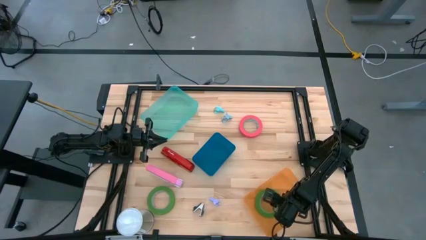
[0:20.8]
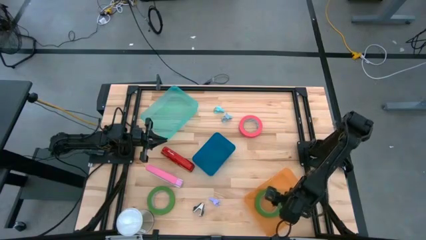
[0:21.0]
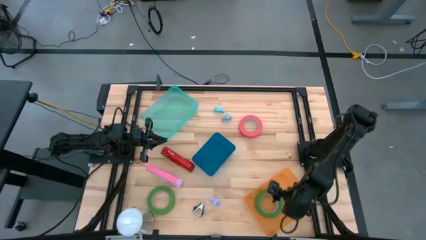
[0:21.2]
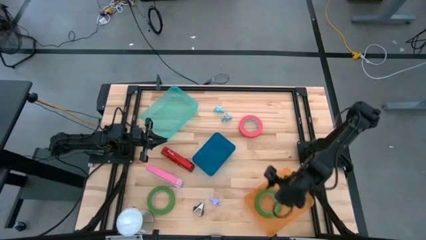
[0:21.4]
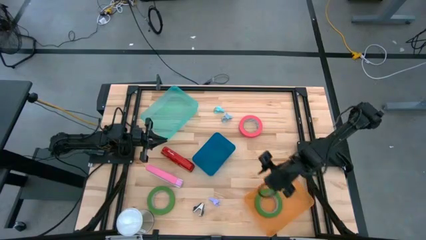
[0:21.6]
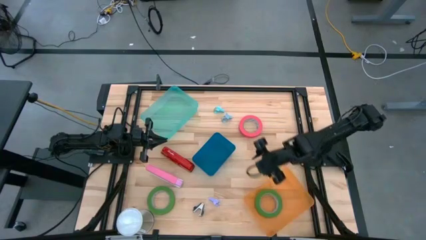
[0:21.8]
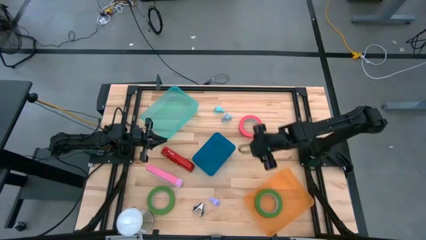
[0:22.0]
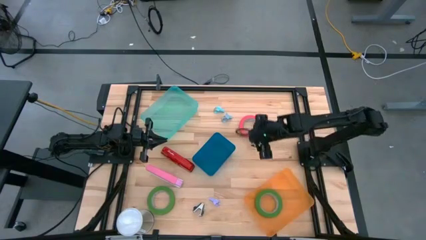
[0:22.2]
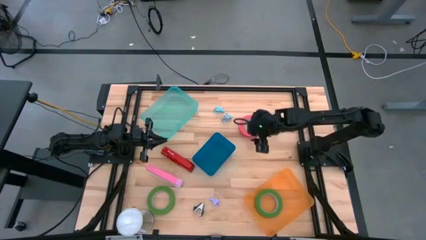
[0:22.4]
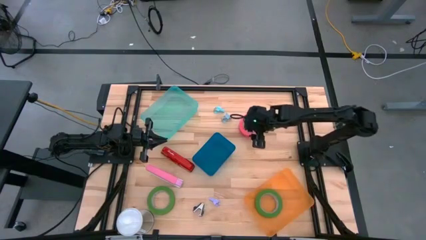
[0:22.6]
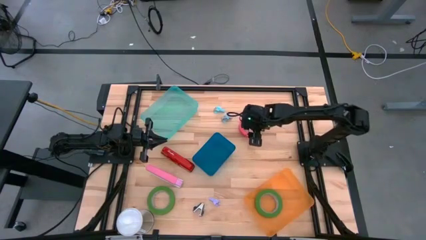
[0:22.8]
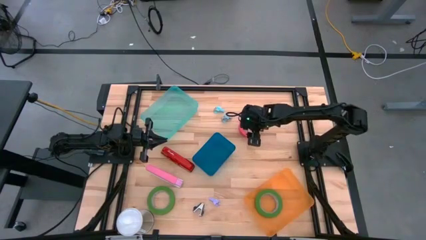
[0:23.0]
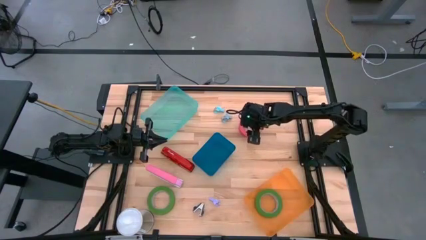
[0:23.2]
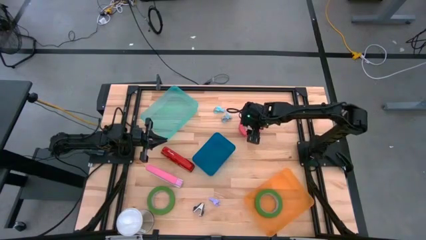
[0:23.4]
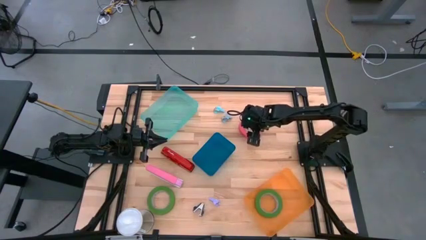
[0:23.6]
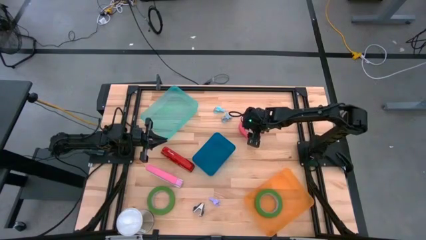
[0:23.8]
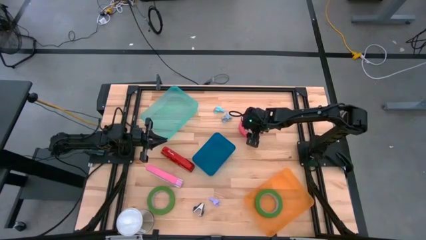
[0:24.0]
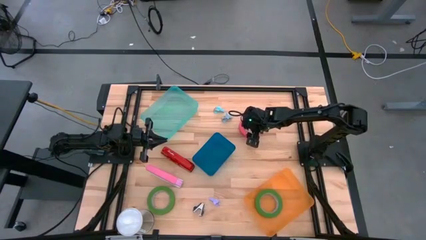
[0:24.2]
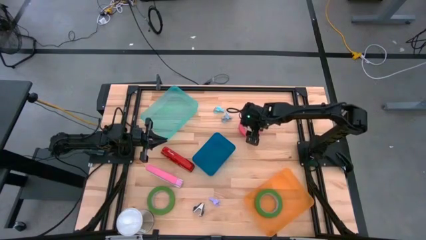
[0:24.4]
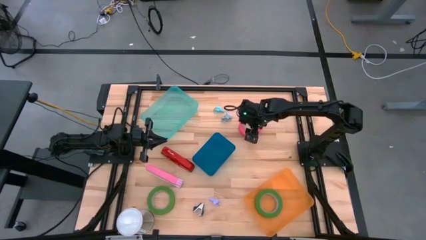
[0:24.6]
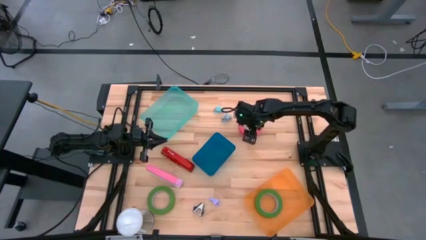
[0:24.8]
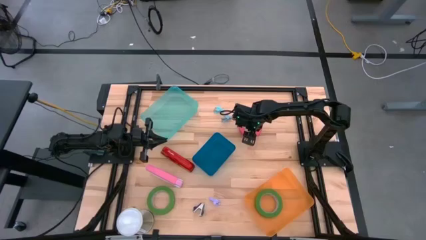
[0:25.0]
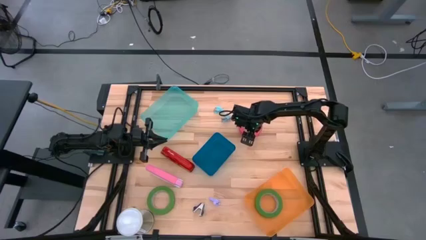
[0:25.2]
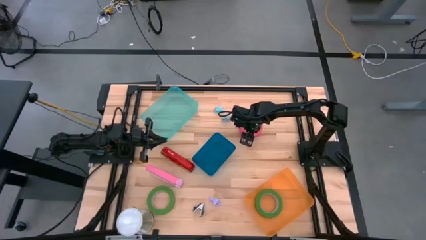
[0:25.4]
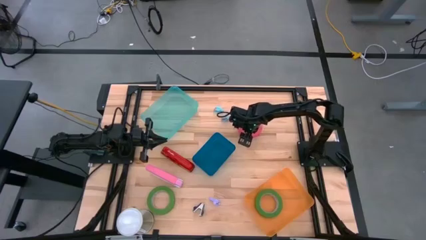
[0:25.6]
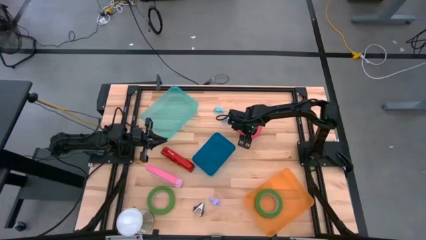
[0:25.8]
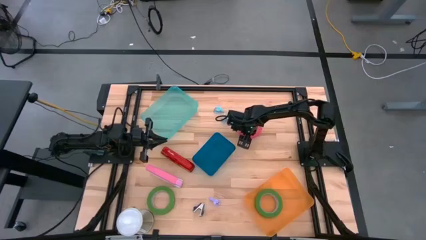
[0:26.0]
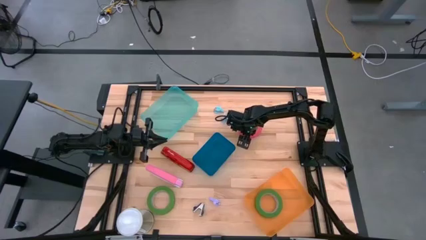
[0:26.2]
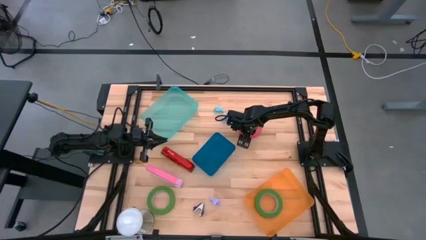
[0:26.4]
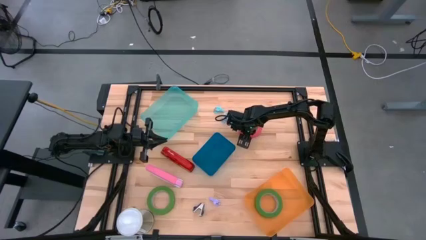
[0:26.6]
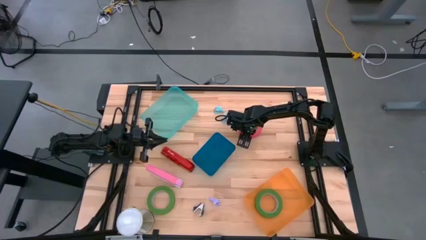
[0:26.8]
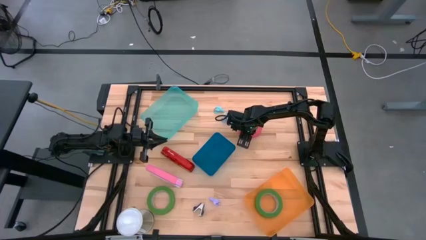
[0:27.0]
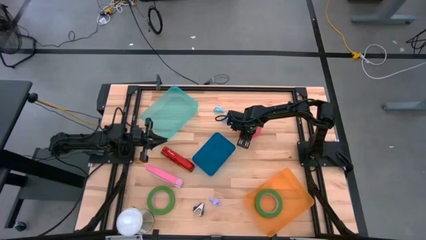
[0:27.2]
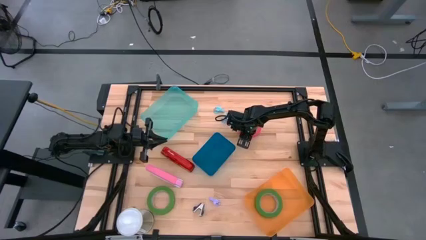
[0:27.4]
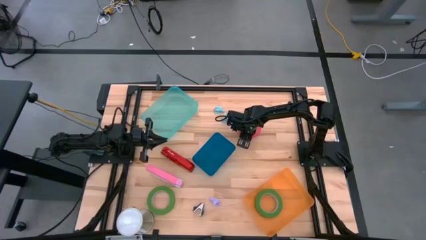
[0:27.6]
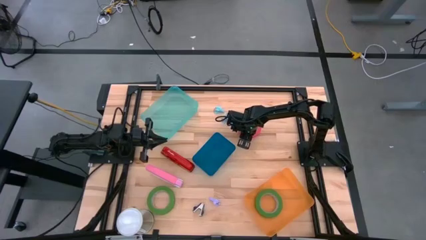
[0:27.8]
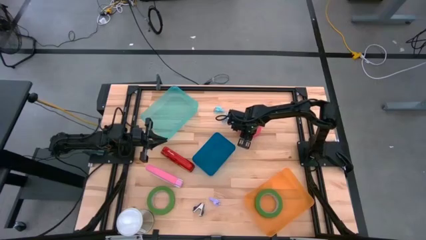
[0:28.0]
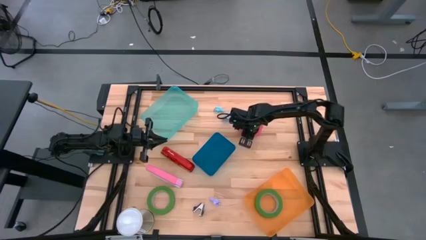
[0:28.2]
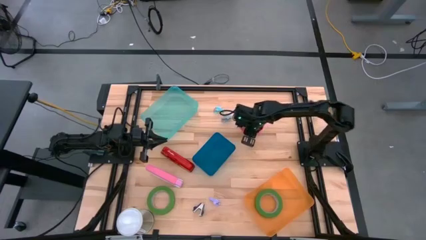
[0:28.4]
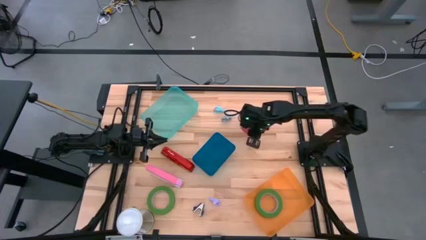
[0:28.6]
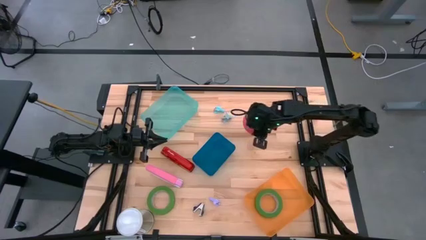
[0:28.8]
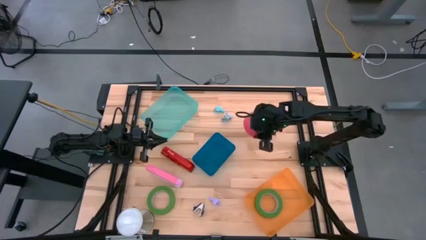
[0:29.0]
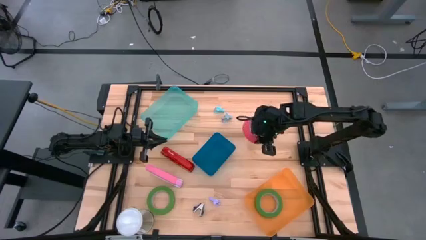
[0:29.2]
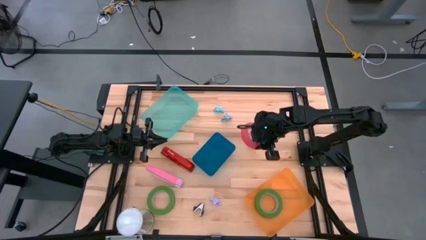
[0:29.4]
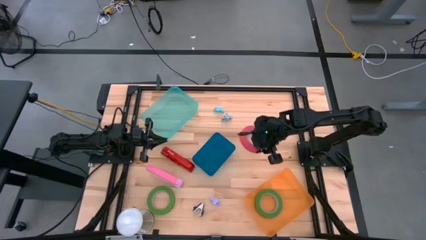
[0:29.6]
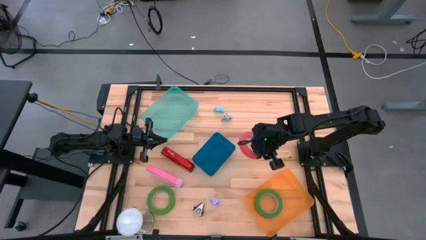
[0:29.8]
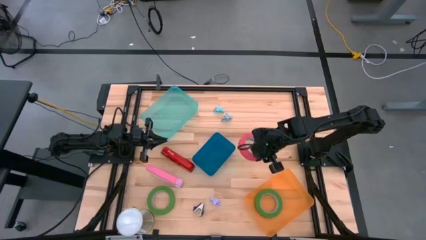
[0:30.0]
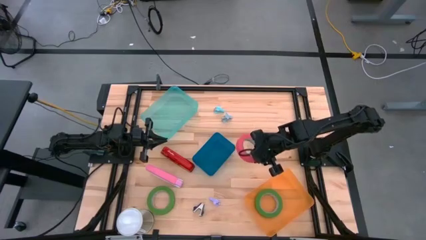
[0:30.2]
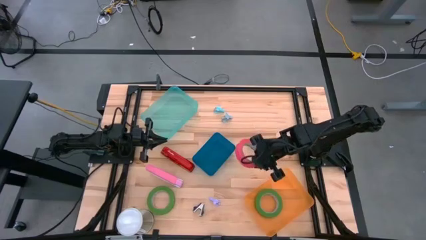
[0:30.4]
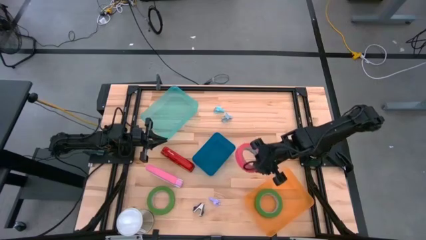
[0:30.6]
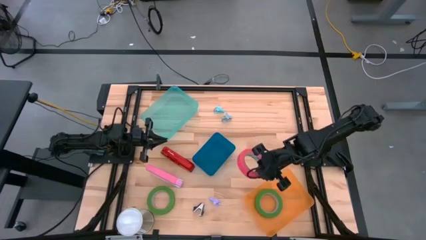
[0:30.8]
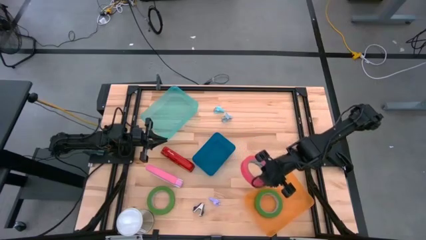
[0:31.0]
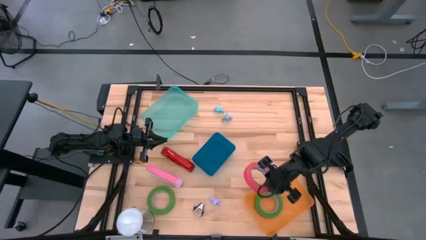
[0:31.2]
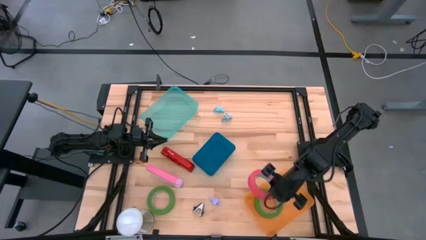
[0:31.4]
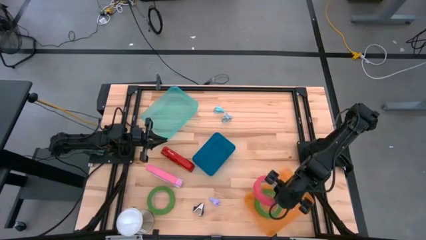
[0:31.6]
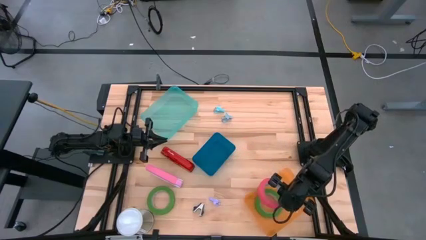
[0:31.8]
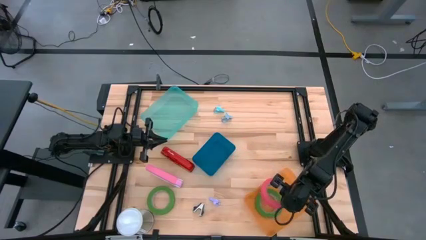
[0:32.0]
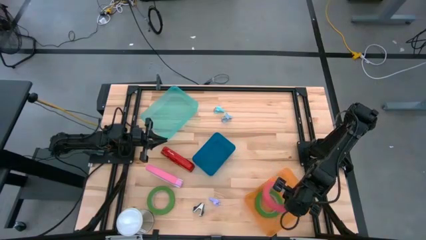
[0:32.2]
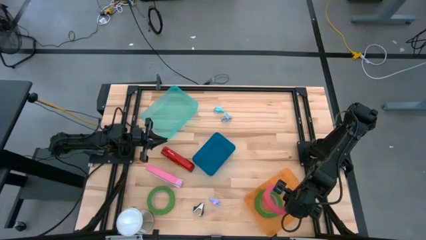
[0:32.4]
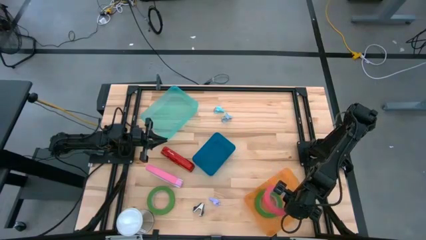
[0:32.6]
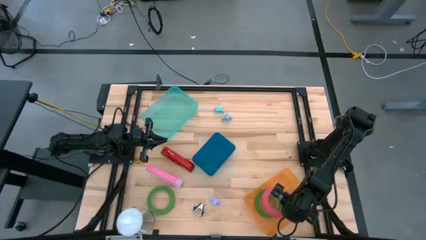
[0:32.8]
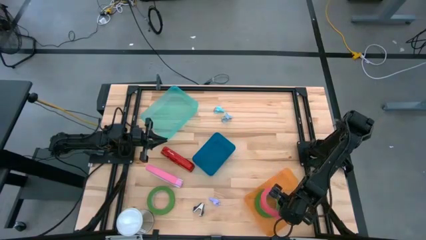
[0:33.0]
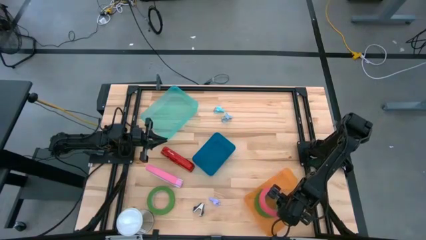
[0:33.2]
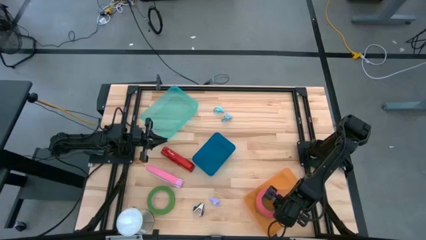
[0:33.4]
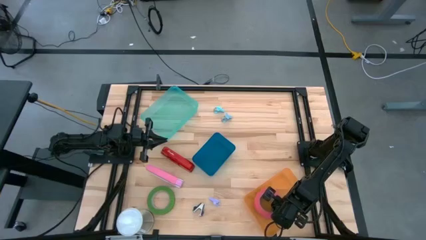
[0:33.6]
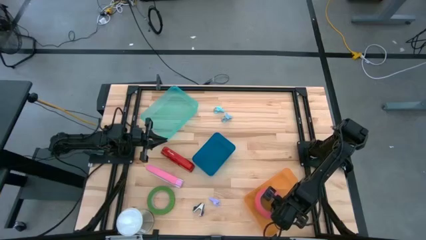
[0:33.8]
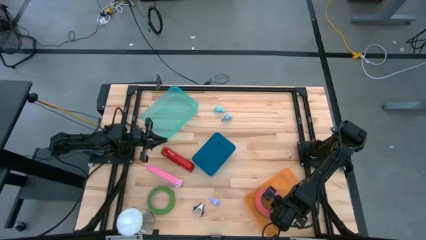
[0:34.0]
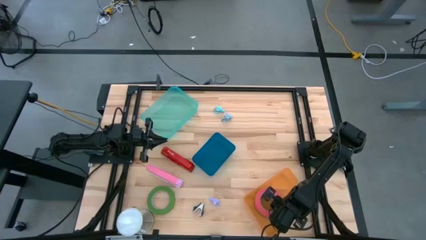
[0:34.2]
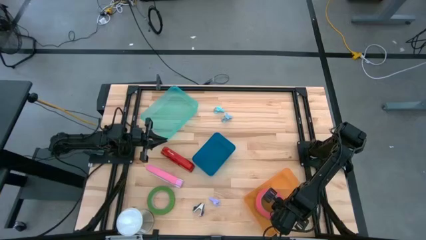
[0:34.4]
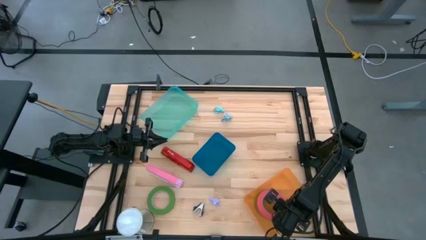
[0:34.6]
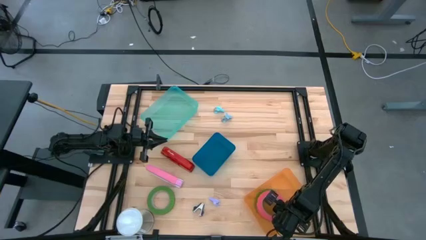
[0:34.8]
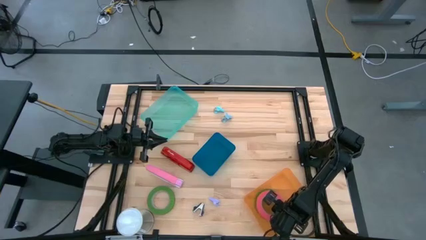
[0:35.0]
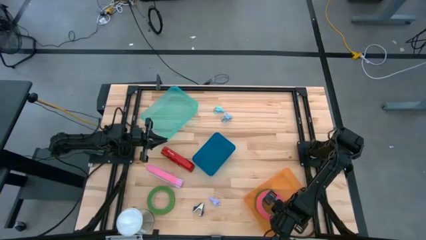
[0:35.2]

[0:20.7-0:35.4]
Task: Pick and place Stapler, Stapler remover, tape
Put the pink tape into the orange bin
